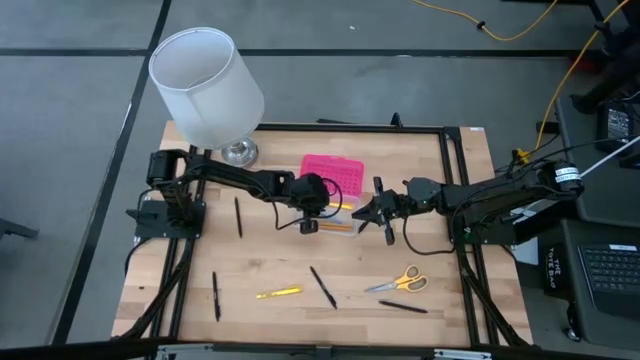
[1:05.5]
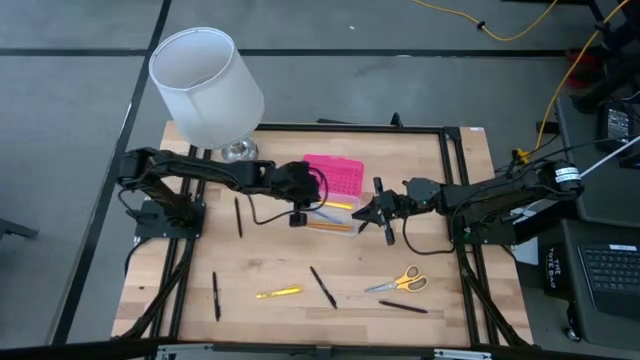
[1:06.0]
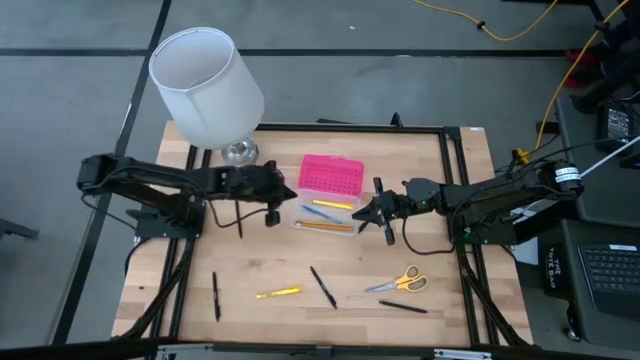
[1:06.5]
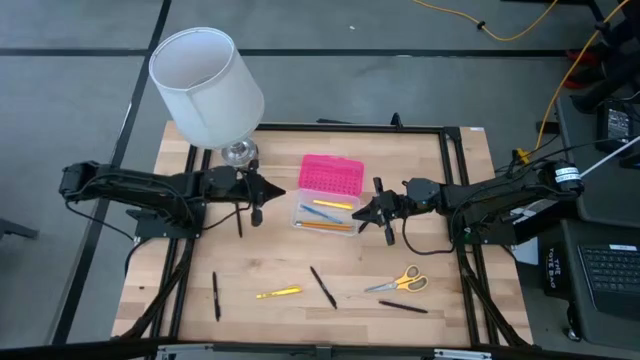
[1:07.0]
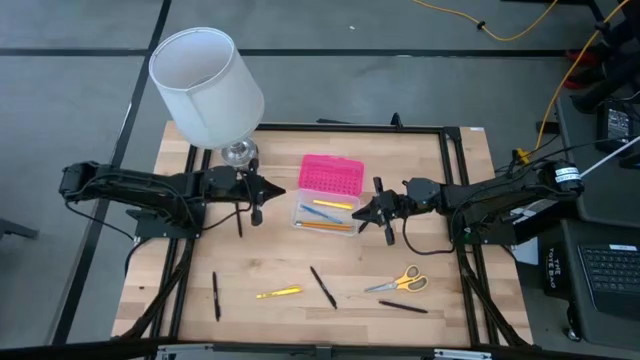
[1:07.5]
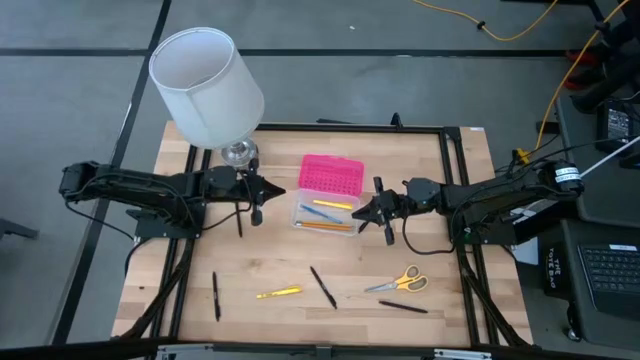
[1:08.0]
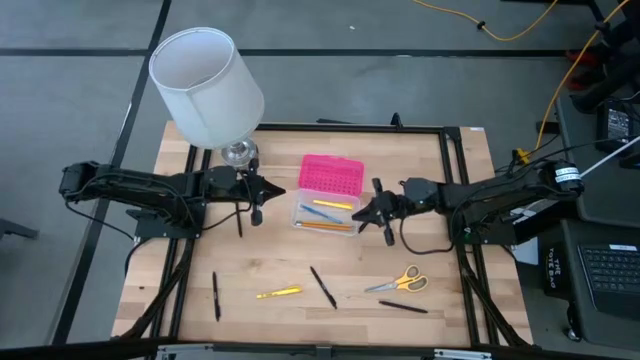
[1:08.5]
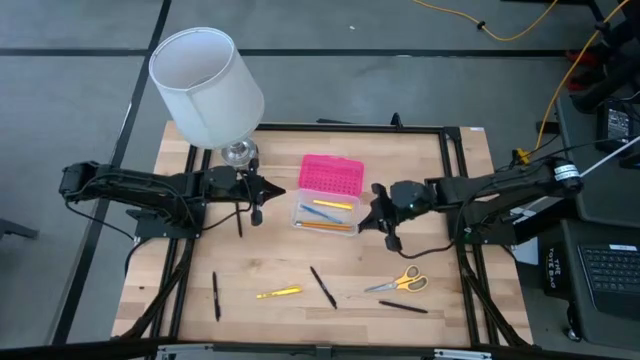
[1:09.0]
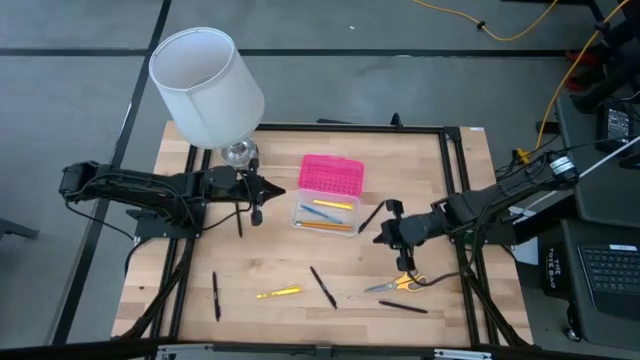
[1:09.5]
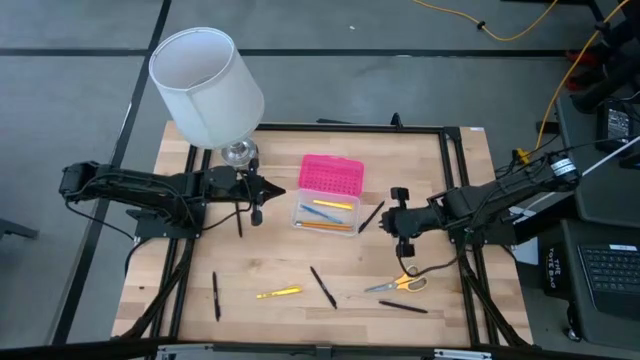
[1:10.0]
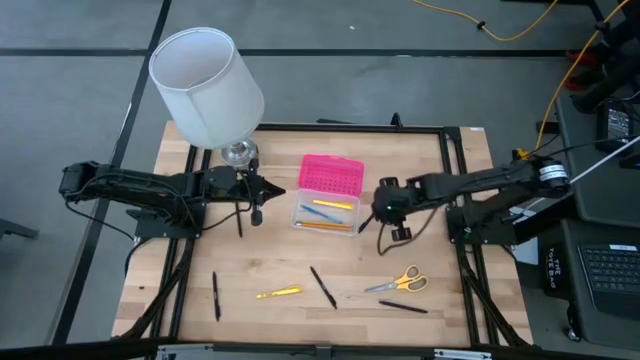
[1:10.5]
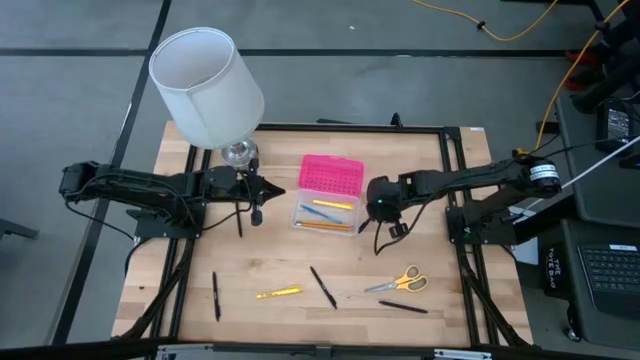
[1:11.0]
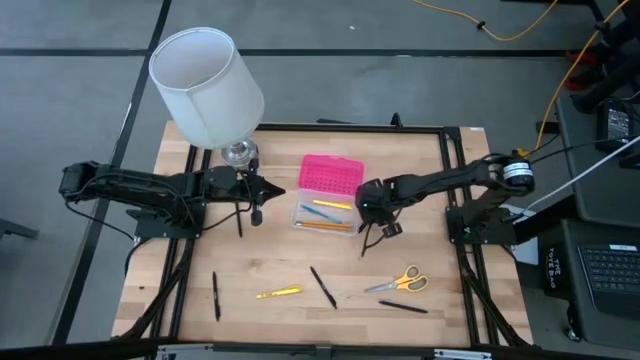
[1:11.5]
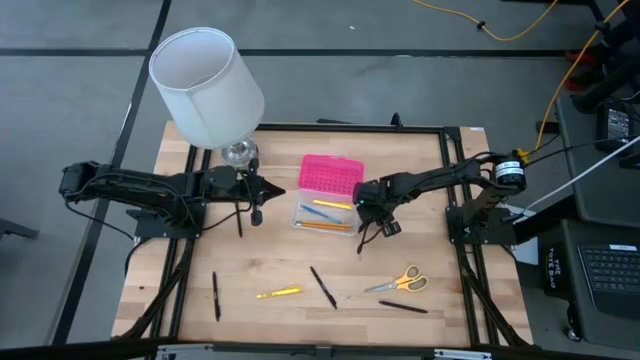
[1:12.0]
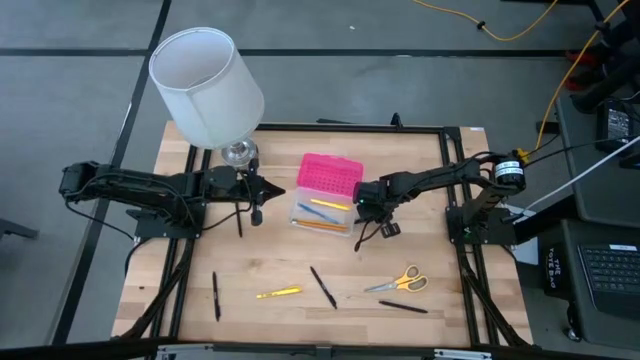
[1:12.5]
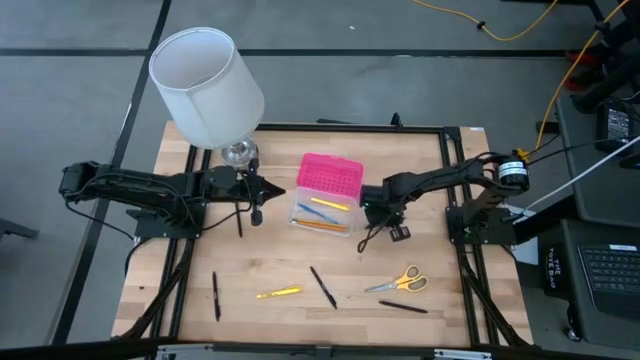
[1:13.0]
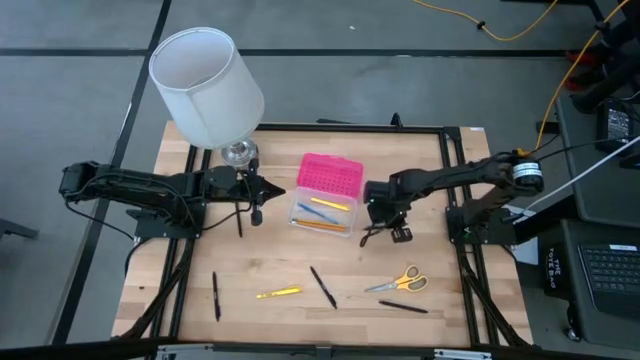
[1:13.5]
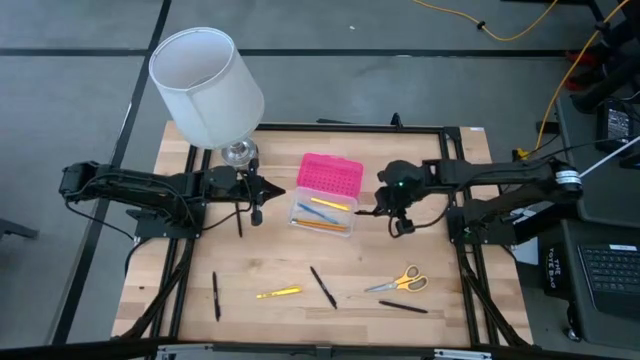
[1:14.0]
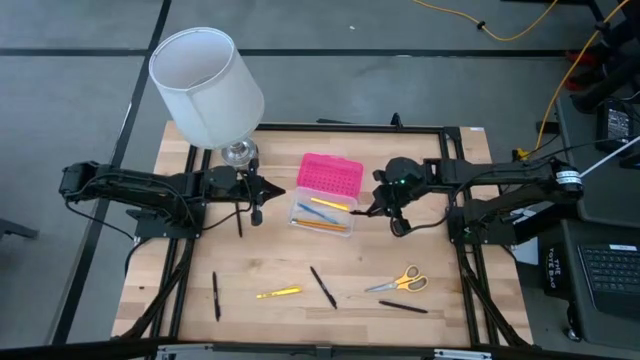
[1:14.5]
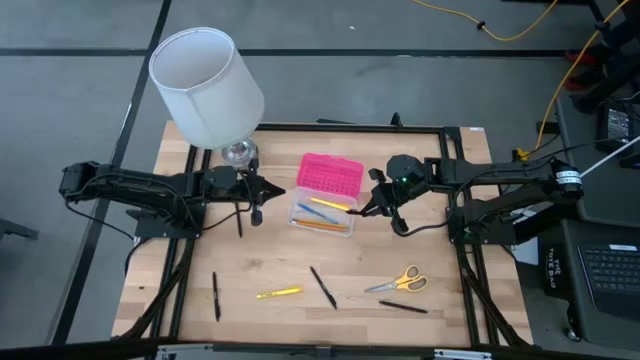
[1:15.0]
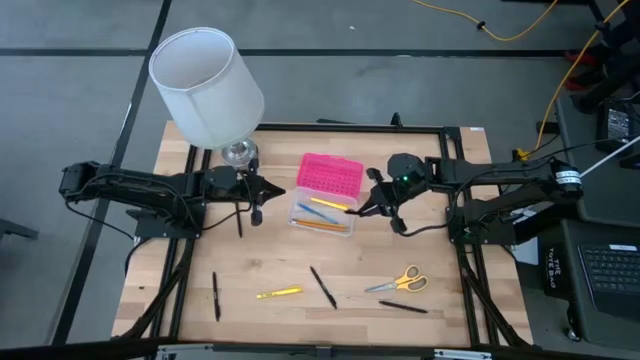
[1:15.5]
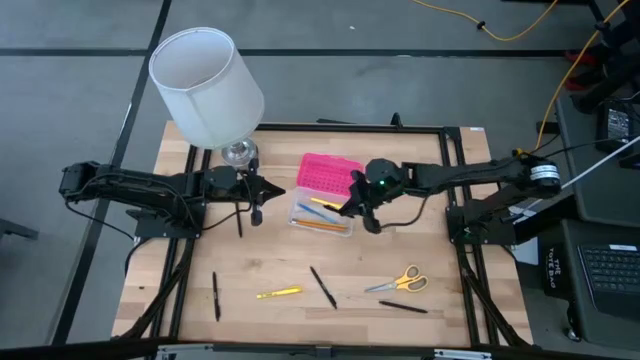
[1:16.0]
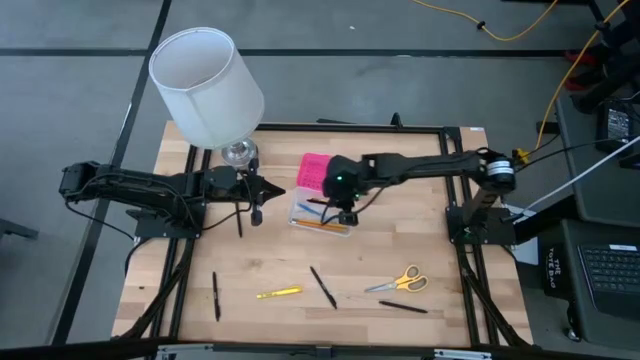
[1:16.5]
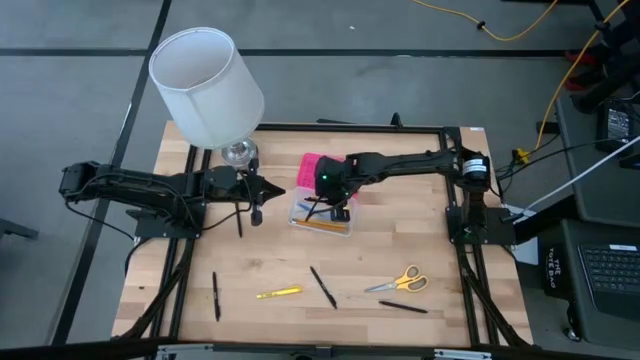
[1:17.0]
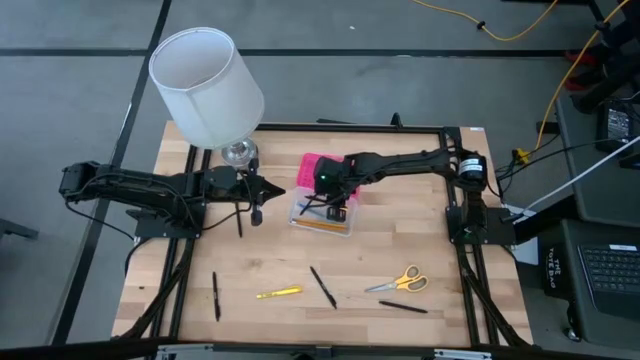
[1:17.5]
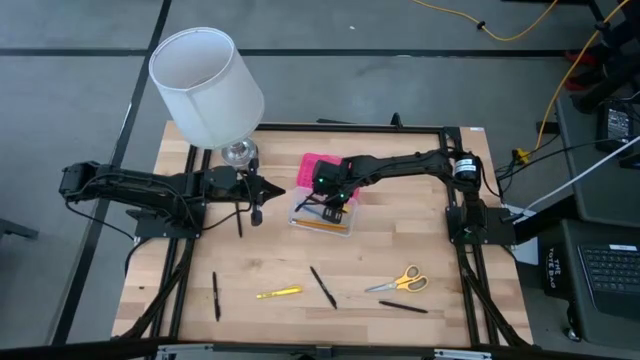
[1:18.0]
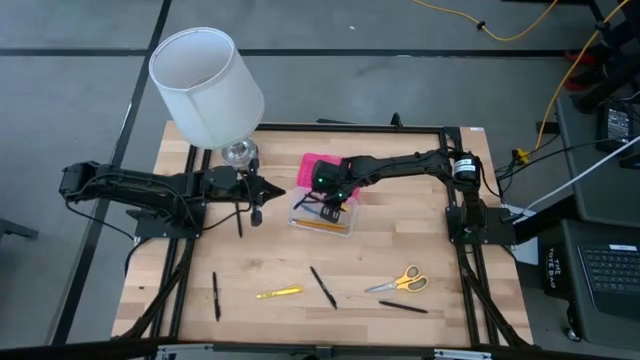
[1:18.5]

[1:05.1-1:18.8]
Task: Pick & place school supplies into a supply box
Put the black pen into the transparent supply box

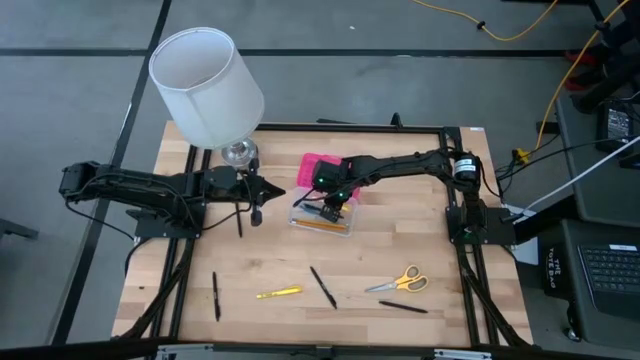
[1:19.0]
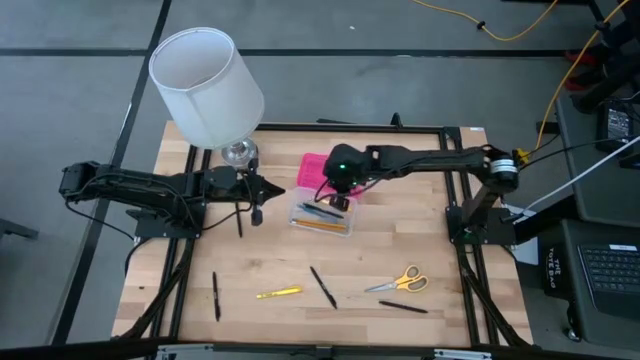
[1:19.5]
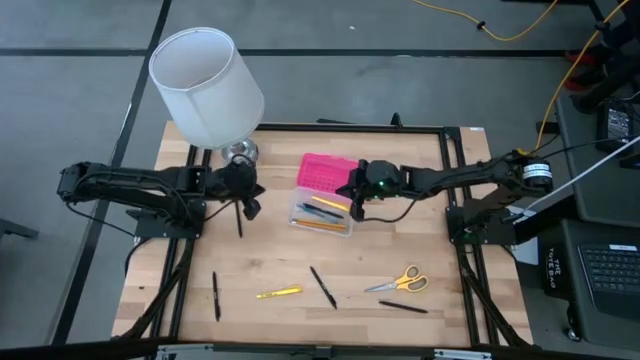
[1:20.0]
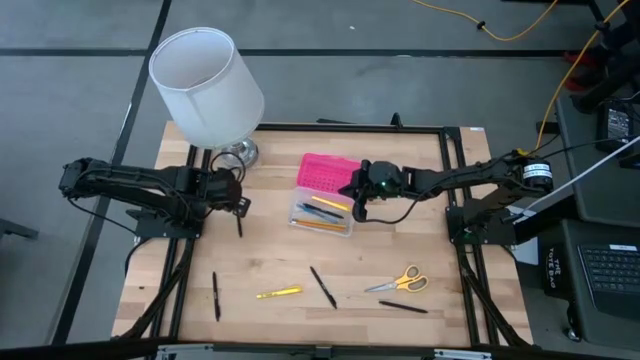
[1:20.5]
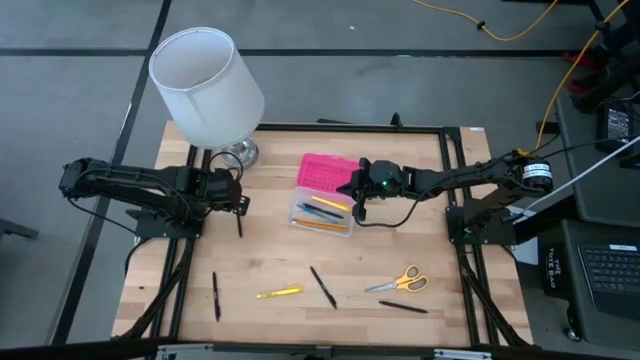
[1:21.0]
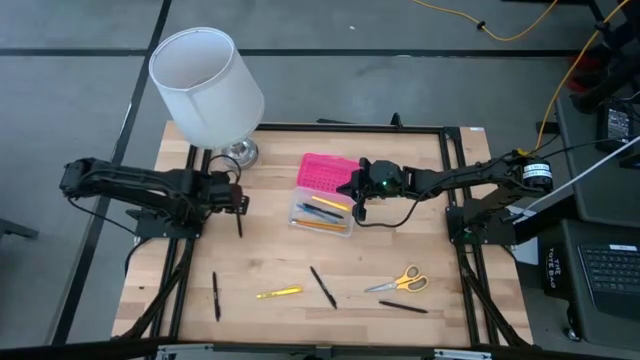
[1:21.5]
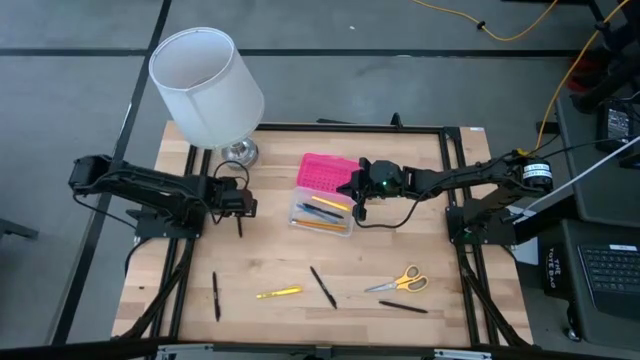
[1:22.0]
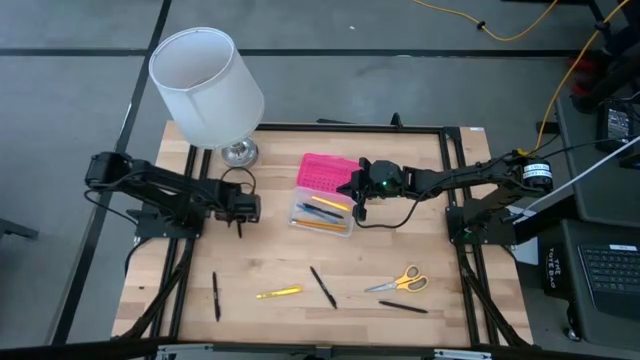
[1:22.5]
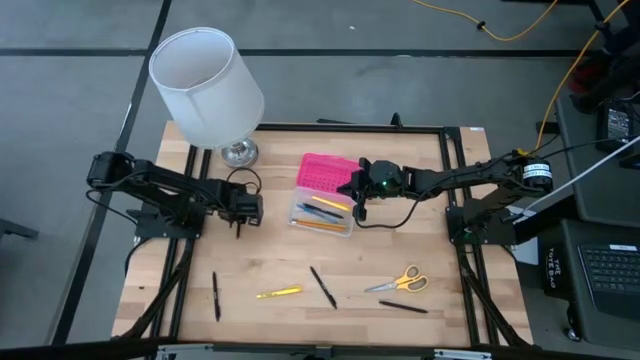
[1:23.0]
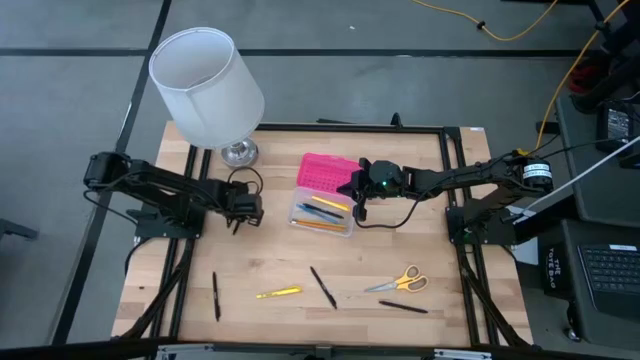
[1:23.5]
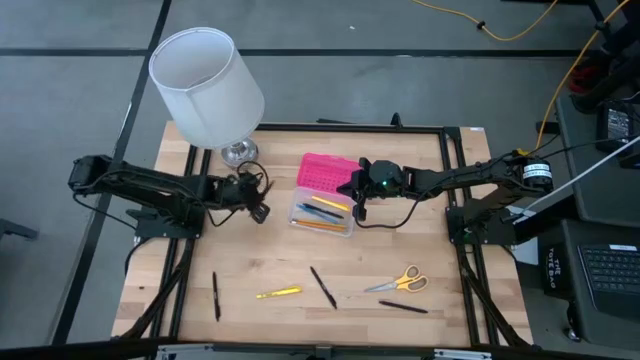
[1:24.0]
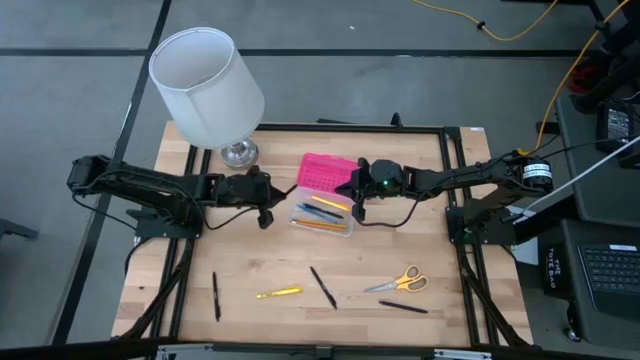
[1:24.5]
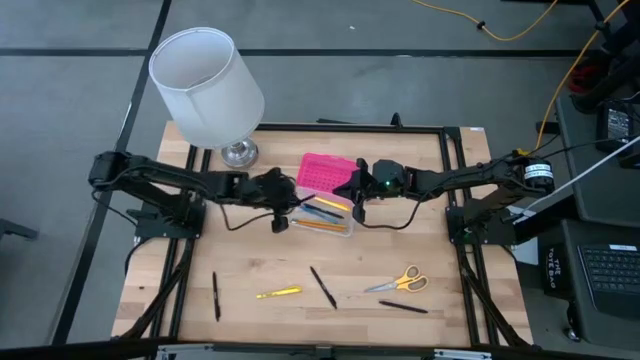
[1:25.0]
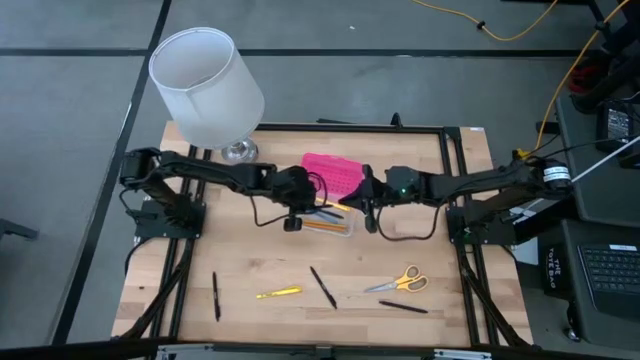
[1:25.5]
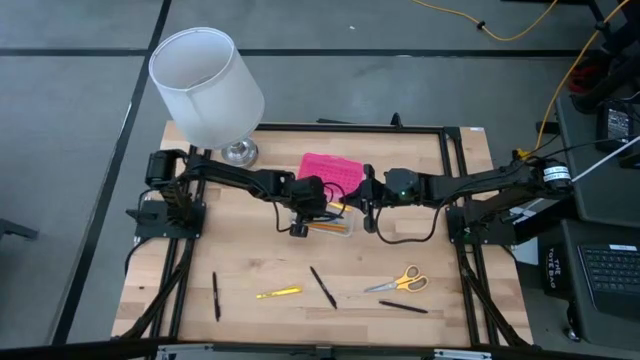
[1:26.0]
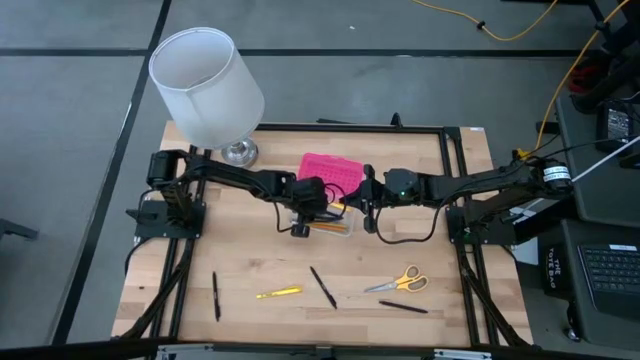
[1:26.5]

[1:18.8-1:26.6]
Put the black pen into the transparent supply box

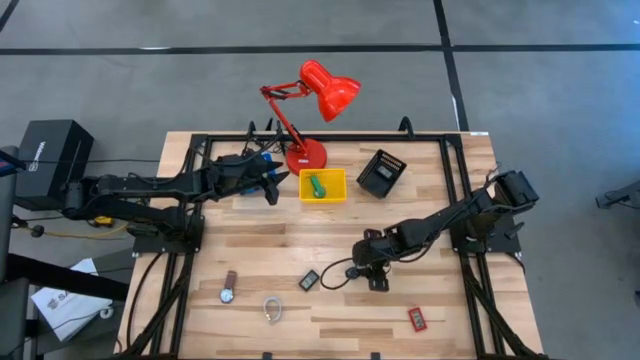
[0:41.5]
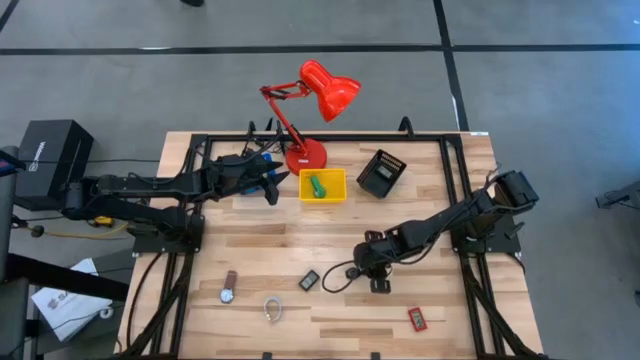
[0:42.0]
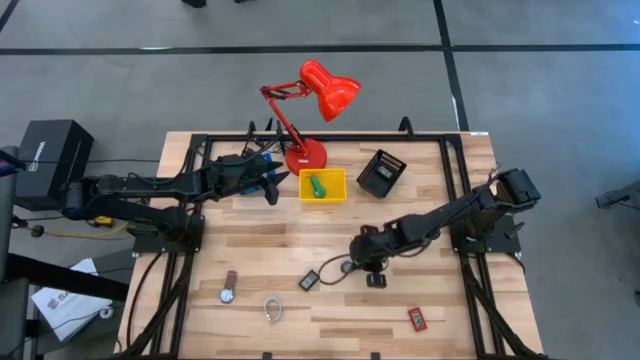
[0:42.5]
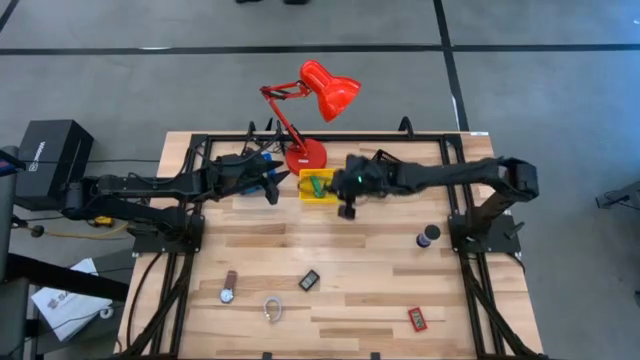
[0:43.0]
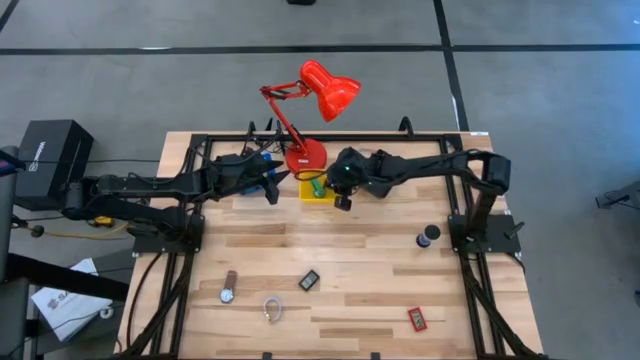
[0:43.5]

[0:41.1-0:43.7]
Task: Pick & Place Office items
Put the black wrist watch into the yellow bin
